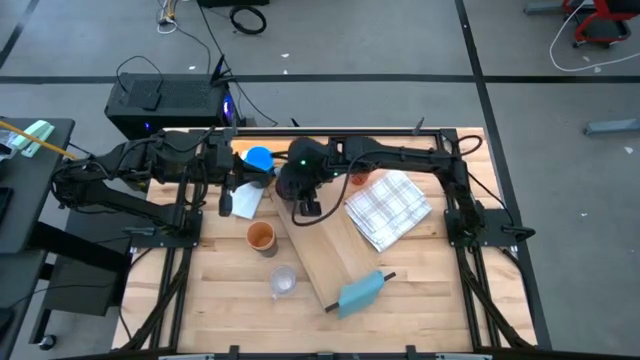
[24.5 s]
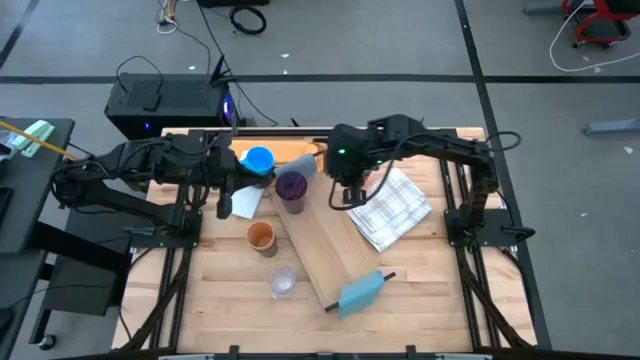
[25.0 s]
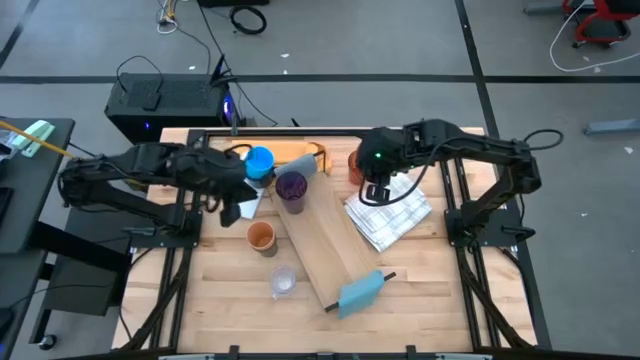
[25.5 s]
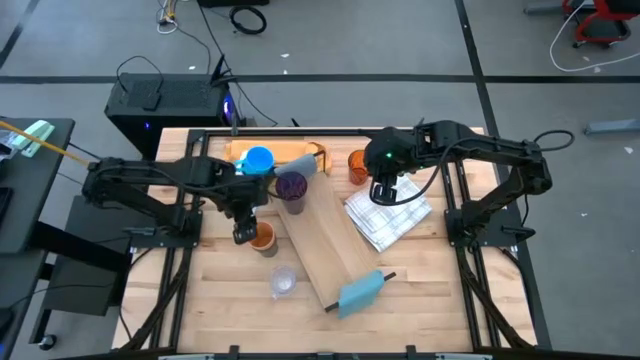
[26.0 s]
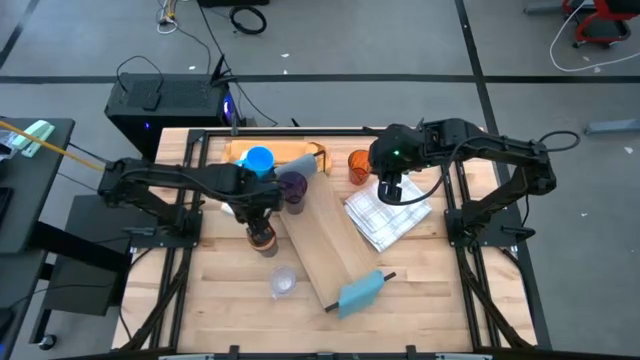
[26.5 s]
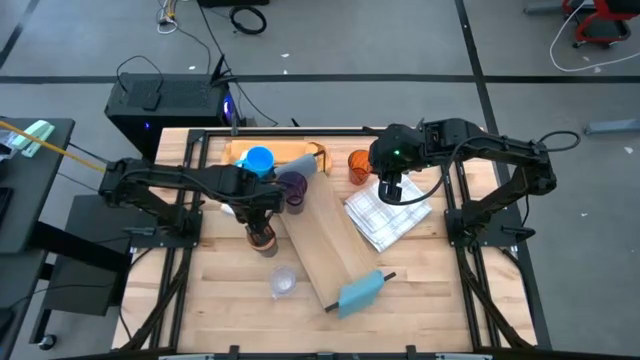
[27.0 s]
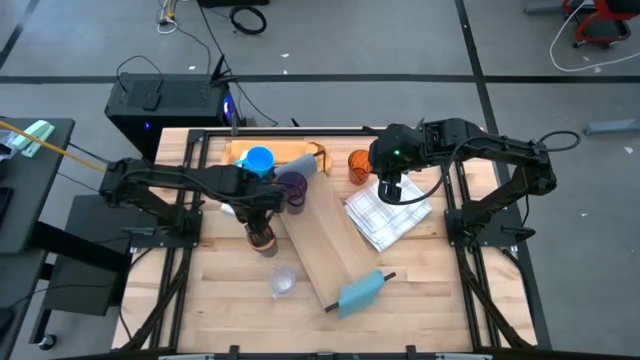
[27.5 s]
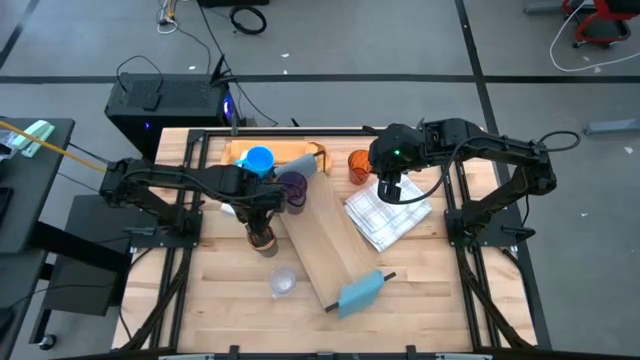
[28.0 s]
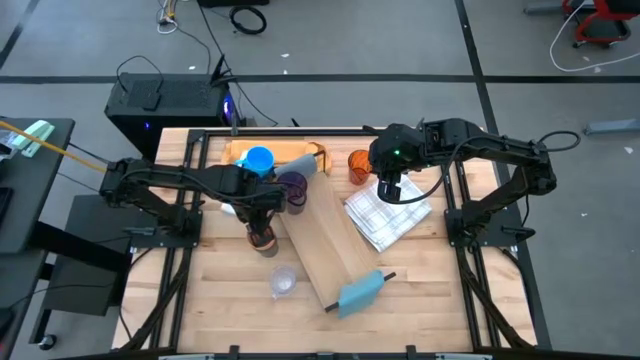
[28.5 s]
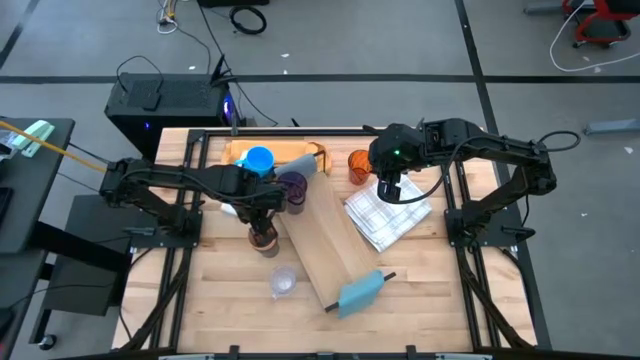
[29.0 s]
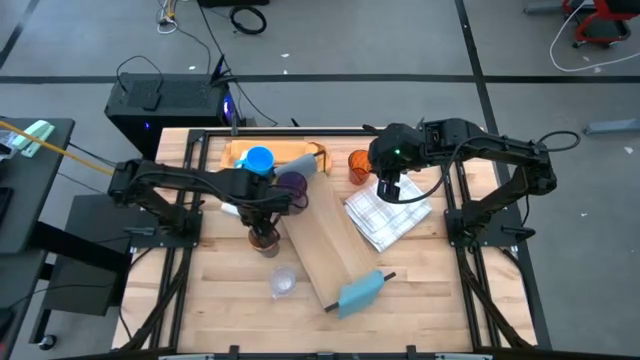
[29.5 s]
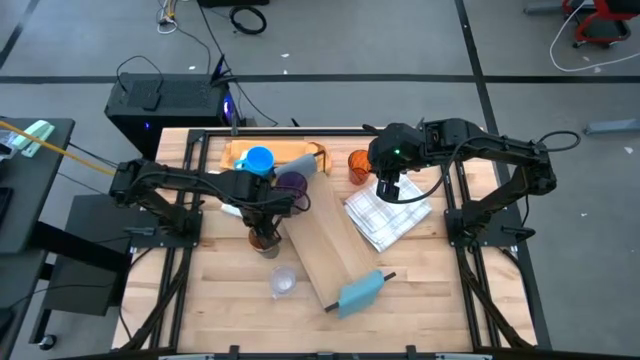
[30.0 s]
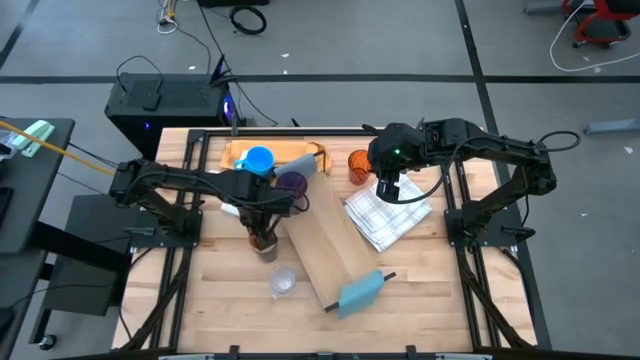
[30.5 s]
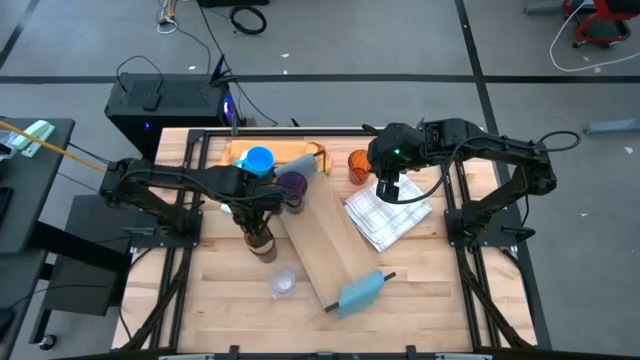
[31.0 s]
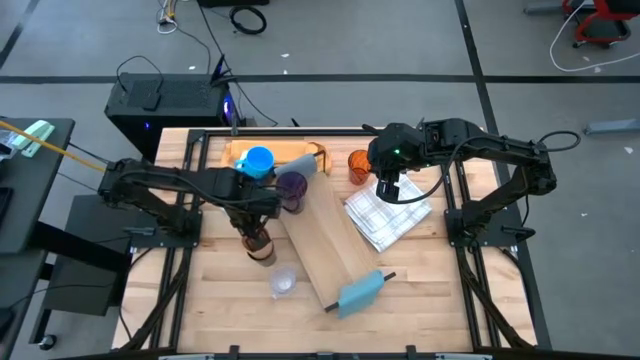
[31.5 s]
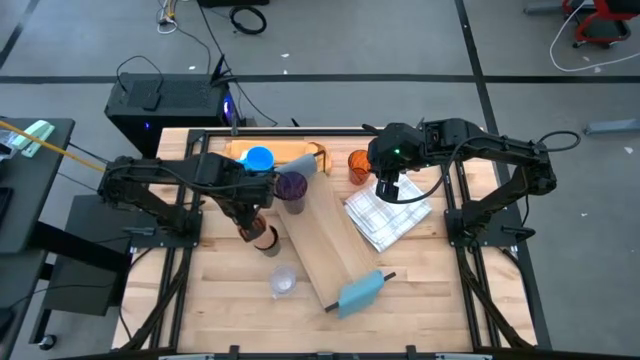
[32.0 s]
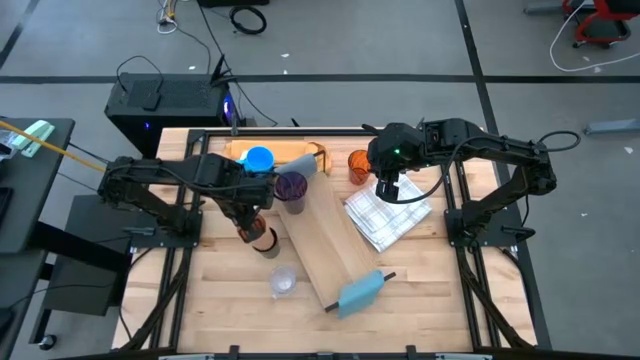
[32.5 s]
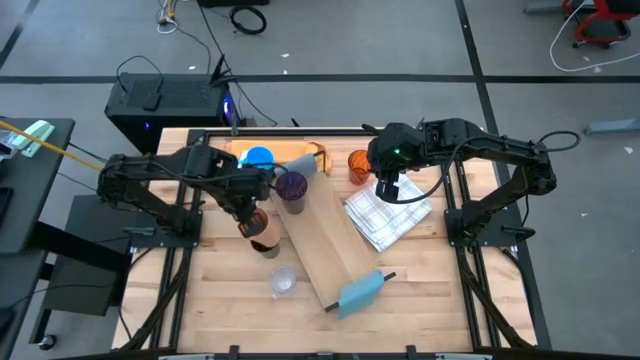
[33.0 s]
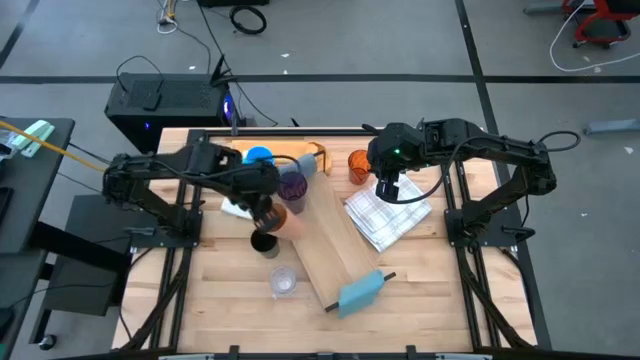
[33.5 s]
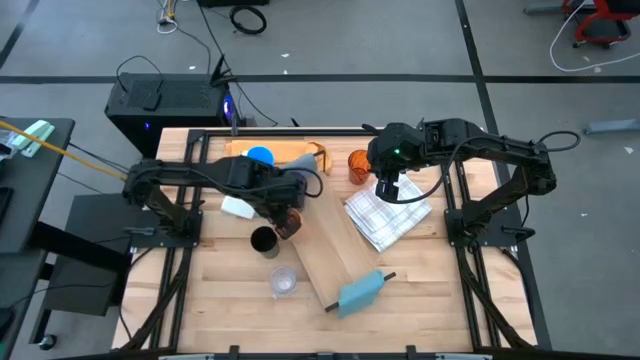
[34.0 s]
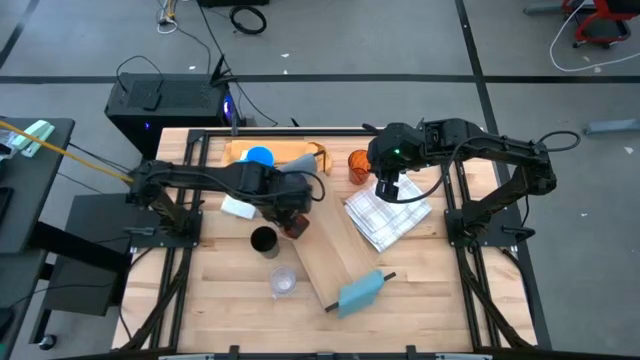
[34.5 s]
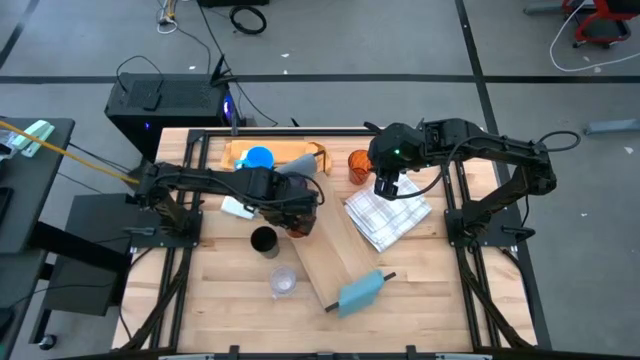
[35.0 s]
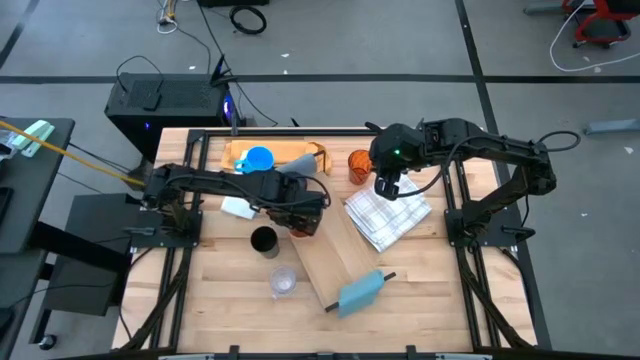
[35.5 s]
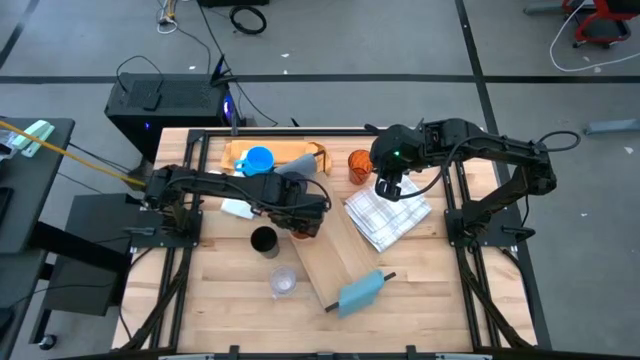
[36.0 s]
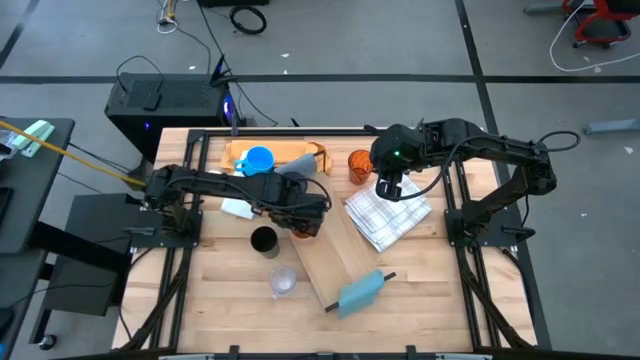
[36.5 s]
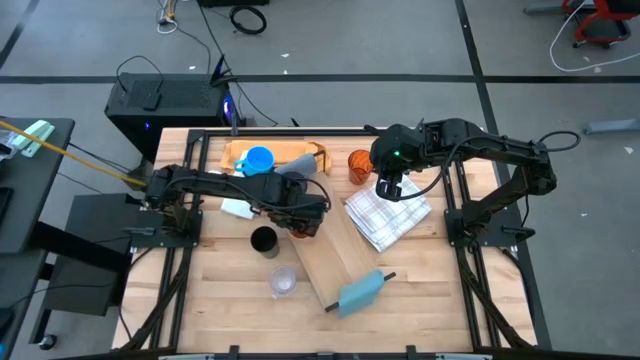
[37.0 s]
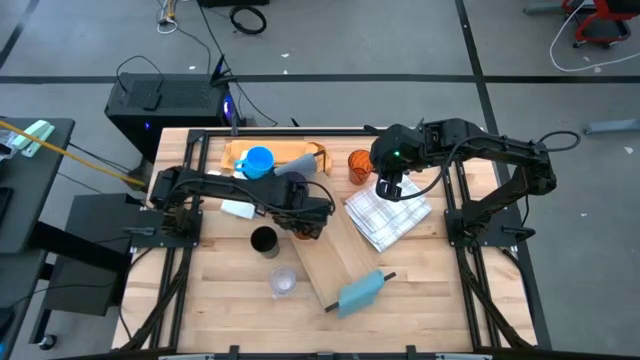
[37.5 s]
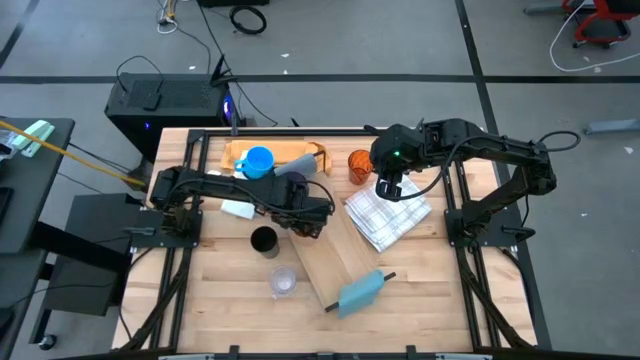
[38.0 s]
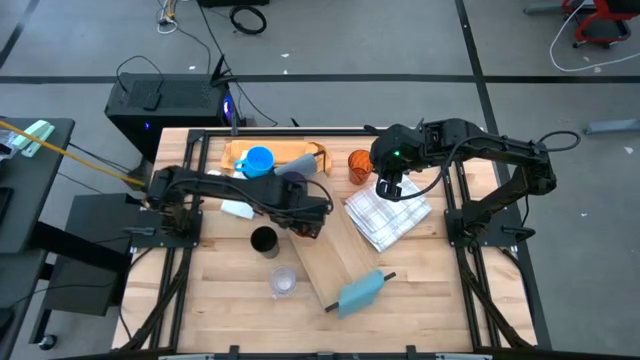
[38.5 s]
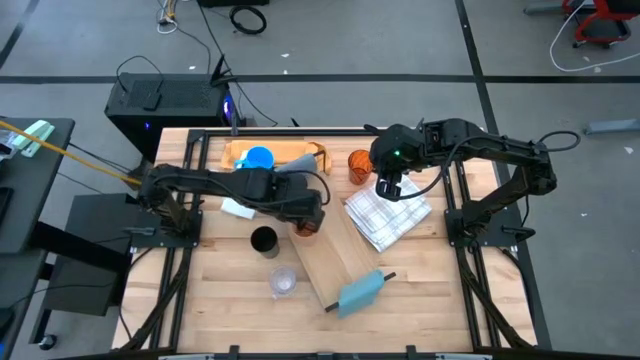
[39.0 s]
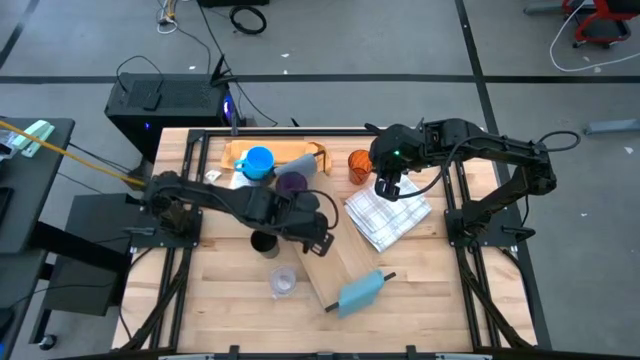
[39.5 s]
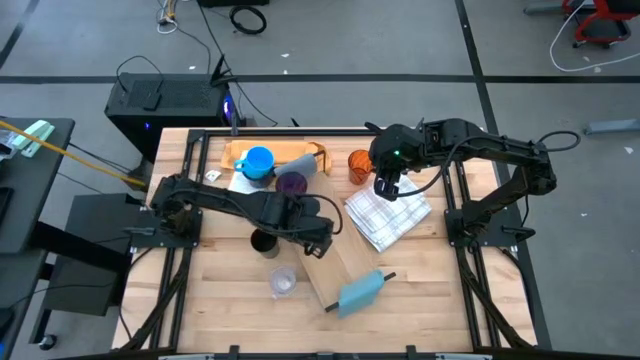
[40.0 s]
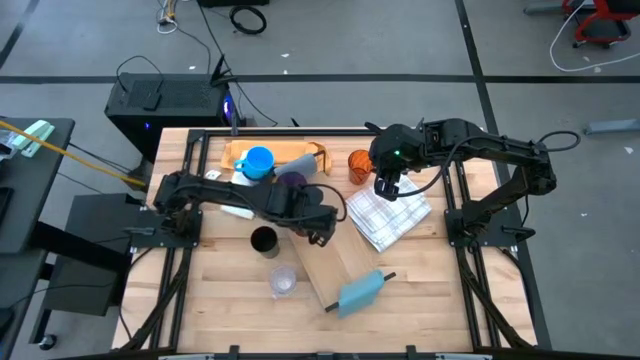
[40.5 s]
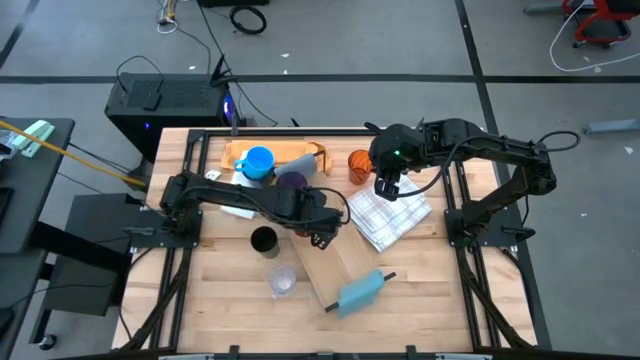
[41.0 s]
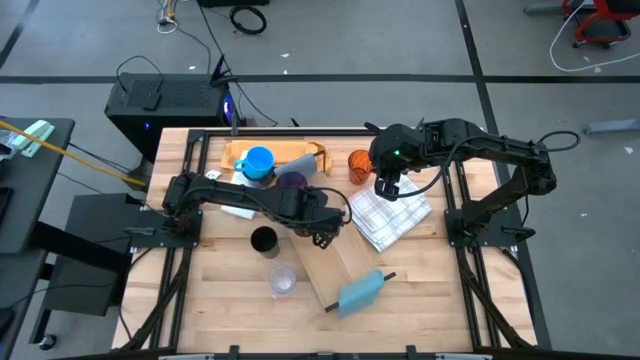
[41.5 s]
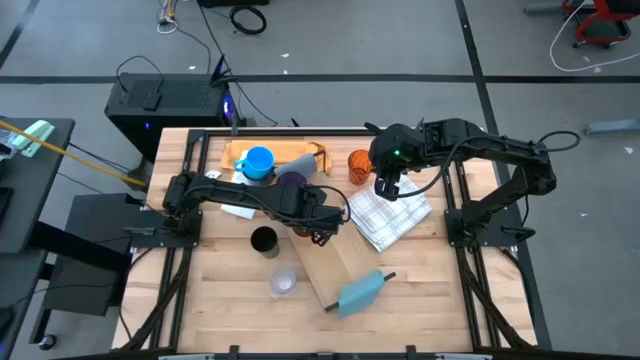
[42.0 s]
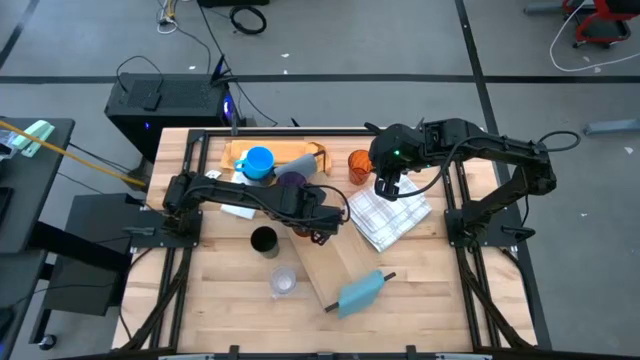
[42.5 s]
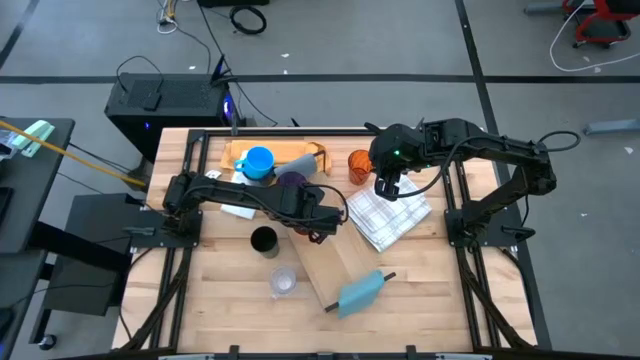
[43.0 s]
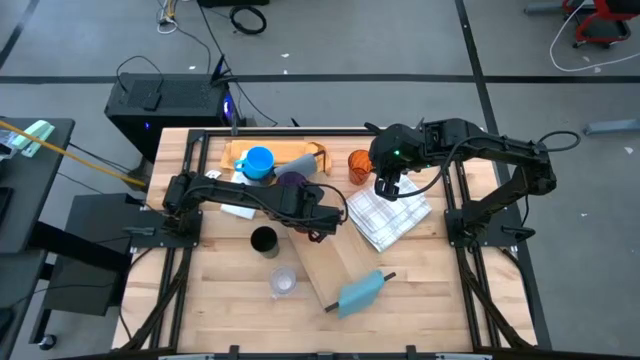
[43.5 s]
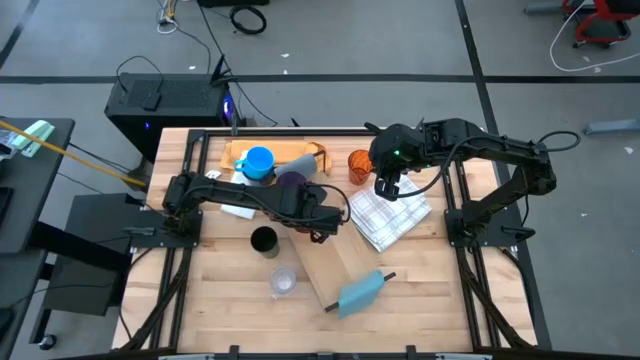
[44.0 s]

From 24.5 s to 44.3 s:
Task: Stack small to large cups/mugs on shelf
Put the light orange cup on the shelf

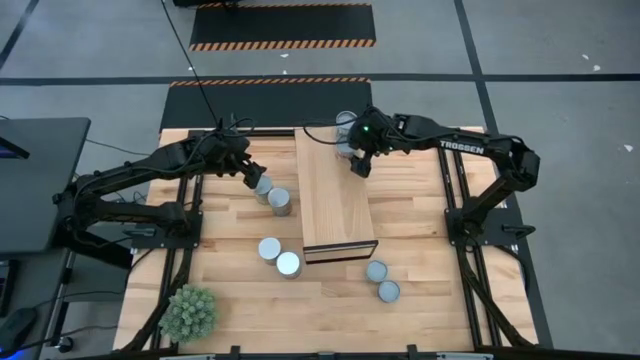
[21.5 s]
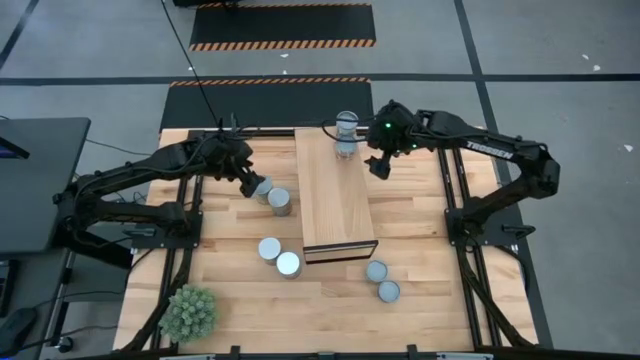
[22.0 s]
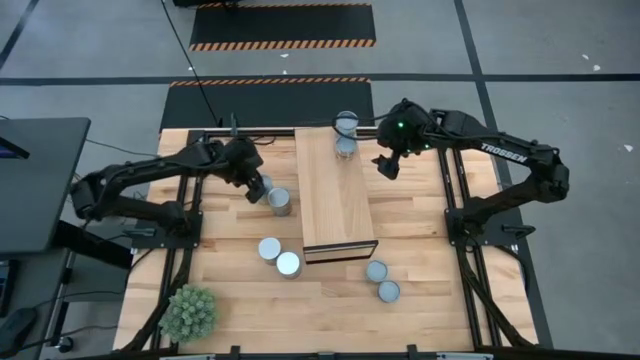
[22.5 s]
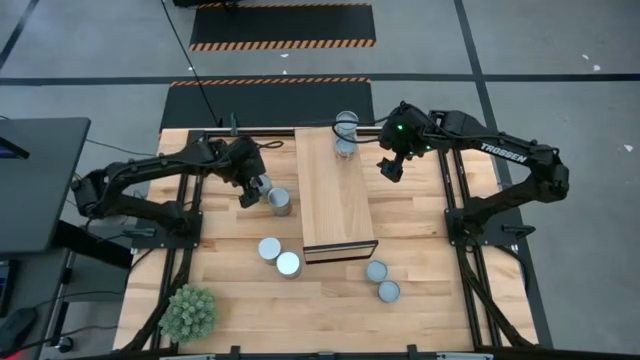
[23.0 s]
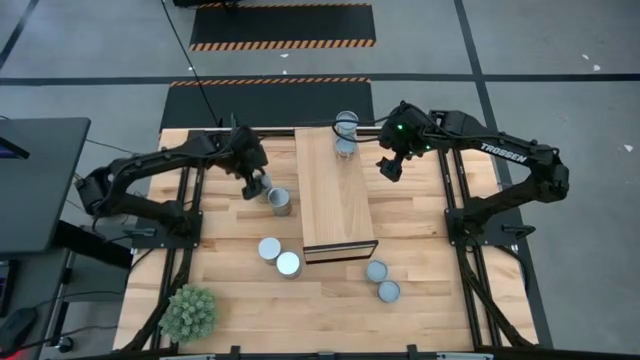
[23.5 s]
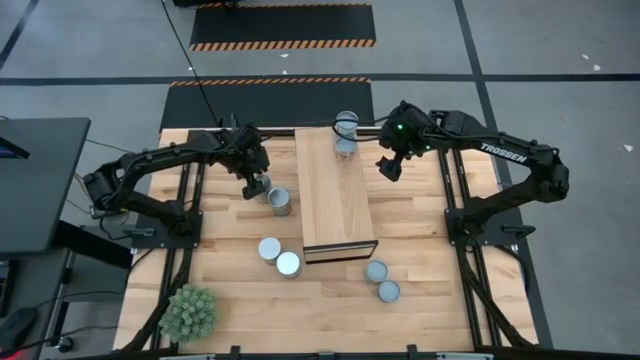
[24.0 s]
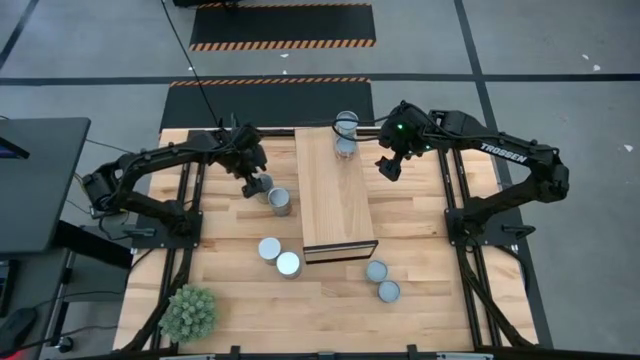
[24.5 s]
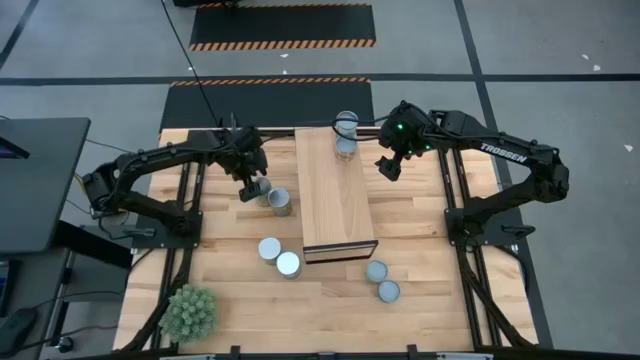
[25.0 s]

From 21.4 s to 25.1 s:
Task: Pick and place cans onto a shelf
Put the canned carrots on the shelf
